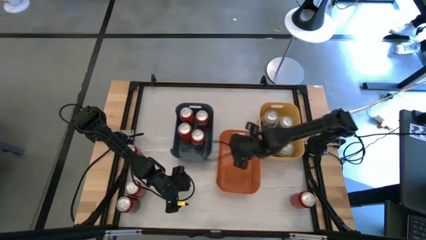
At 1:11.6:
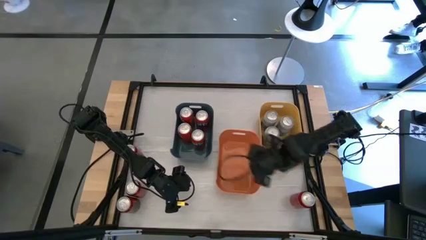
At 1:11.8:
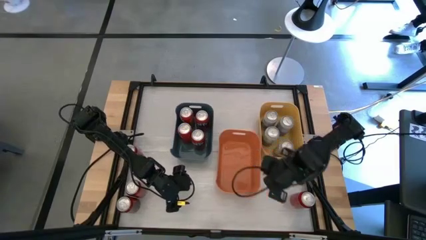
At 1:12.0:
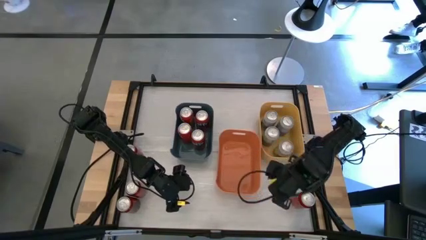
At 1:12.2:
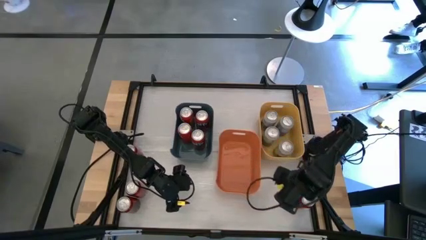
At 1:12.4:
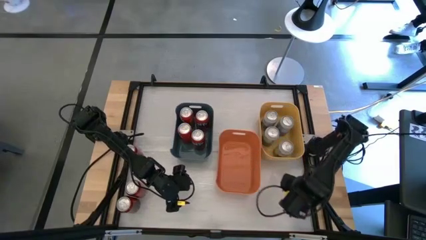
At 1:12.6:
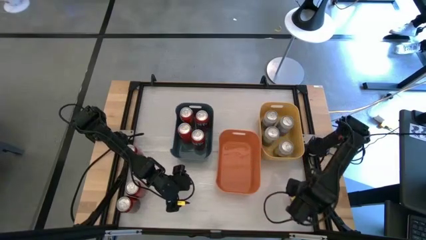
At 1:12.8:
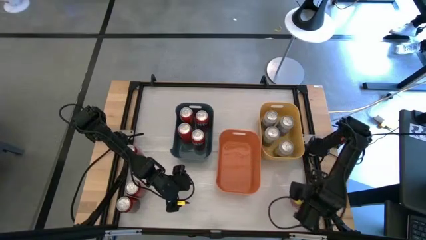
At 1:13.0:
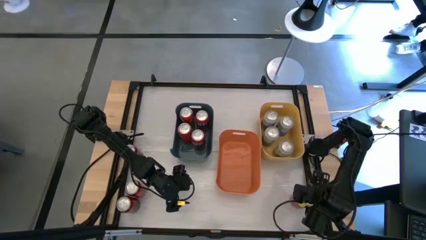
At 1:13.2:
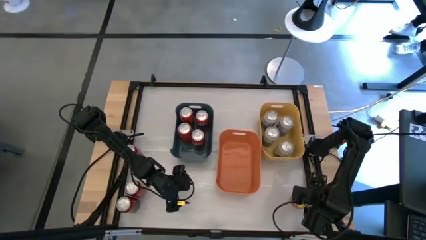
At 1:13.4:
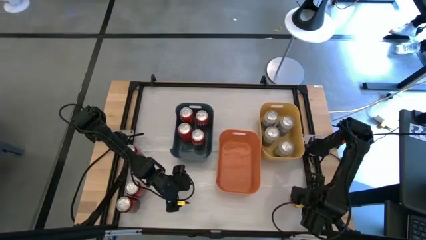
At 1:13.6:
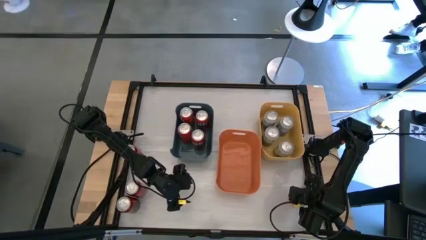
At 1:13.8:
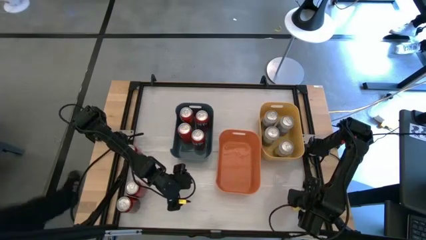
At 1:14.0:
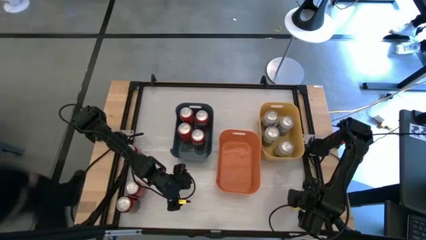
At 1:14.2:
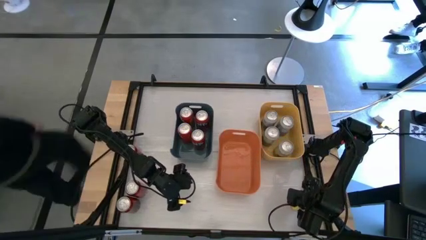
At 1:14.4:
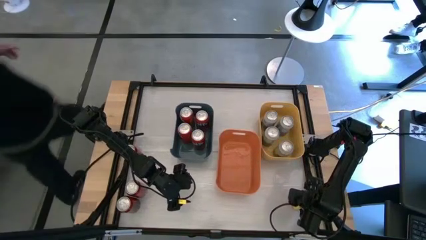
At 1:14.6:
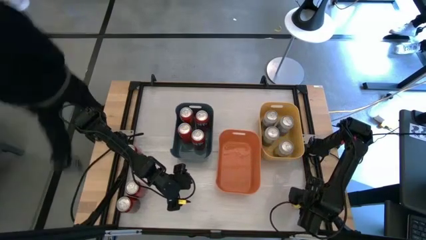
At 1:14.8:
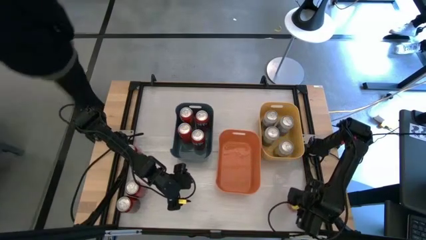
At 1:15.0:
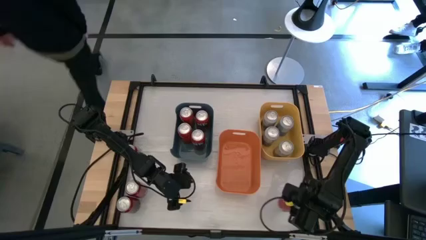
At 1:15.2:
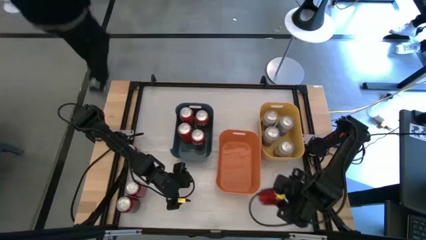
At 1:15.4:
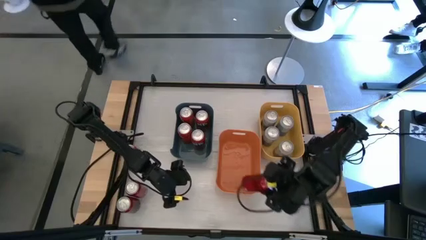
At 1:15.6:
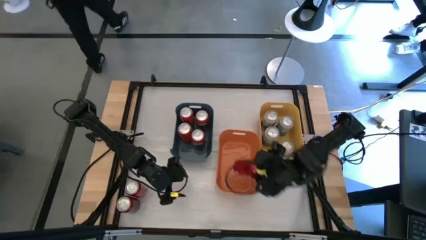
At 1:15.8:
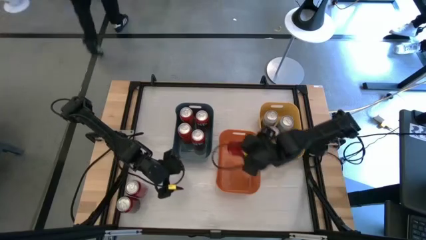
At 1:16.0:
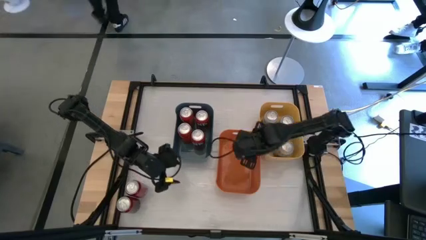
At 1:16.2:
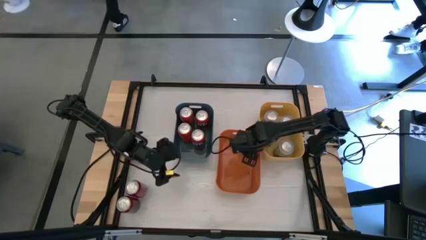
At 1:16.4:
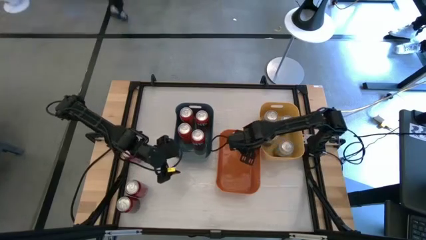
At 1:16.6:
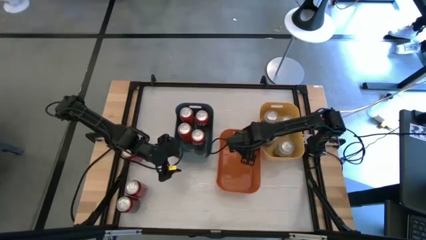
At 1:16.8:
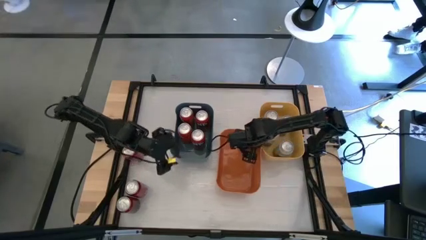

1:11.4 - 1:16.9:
Task: Sort soda cans
Put the right red soda can into the orange bin

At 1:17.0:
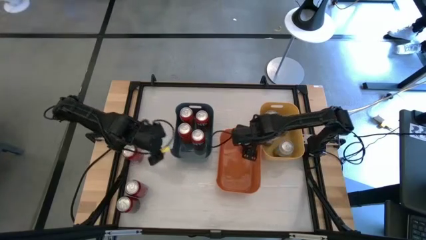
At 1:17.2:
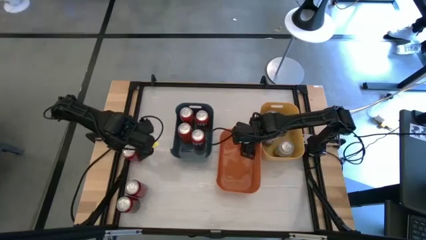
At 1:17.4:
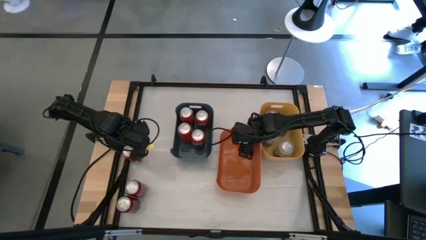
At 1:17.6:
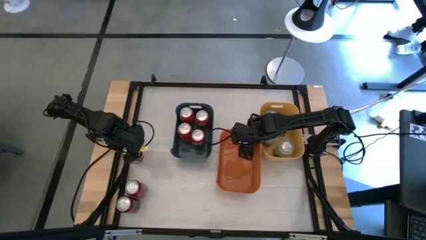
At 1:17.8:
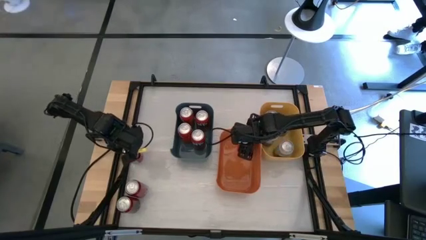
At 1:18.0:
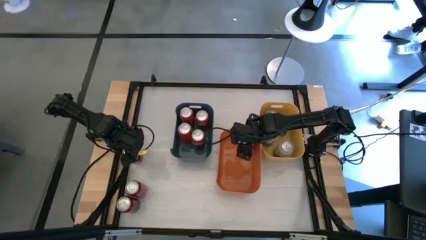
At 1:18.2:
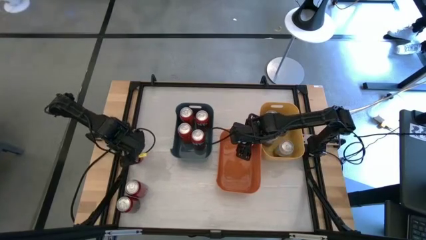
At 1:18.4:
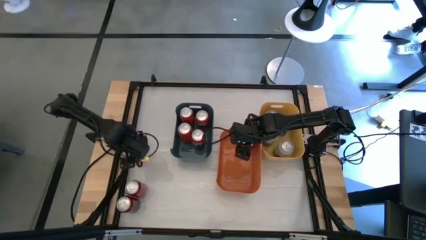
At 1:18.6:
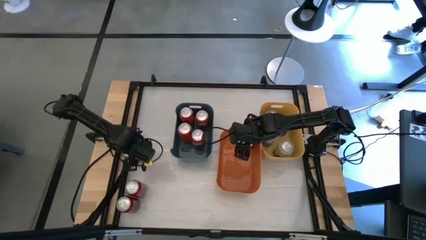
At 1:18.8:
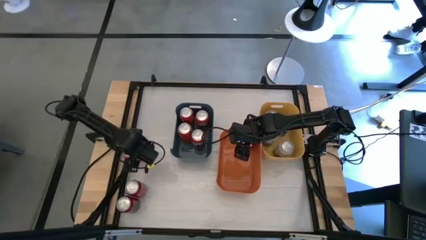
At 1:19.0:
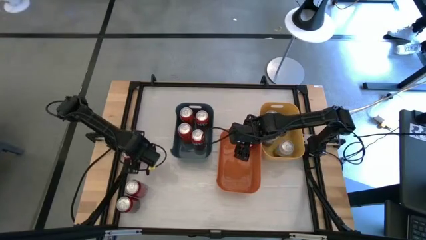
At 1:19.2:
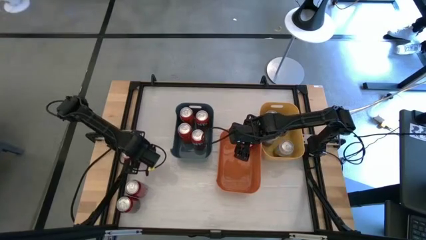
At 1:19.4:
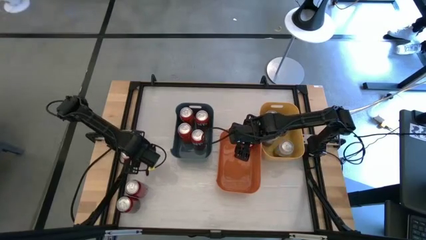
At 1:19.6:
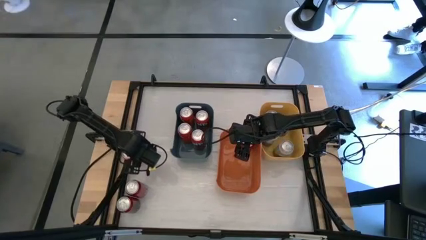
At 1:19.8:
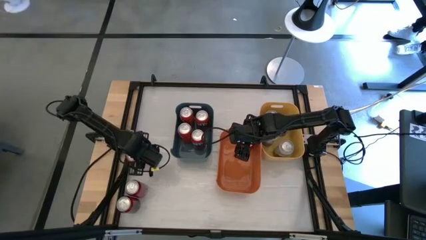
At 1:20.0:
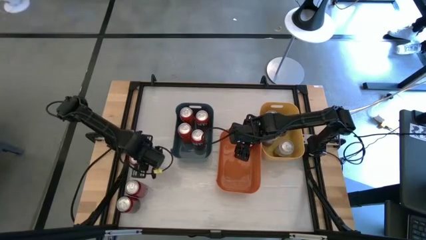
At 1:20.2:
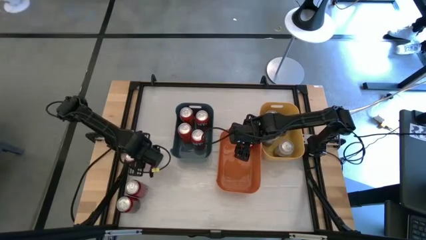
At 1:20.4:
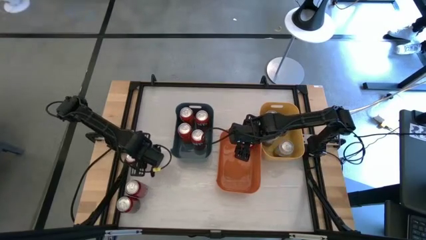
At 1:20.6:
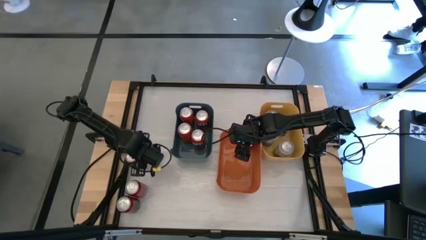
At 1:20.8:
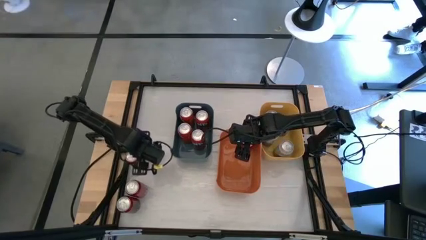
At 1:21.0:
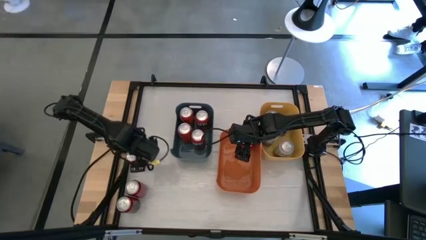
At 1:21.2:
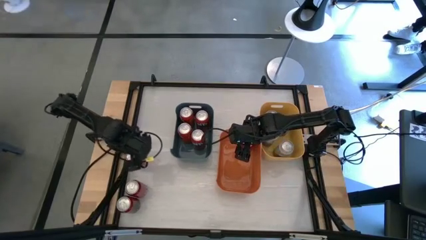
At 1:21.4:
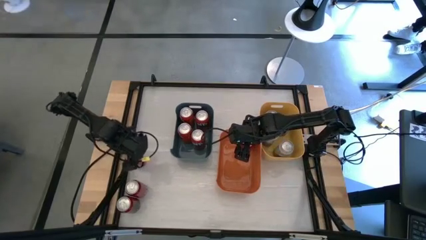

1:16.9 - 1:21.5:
Put the top red soda can into the orange bin

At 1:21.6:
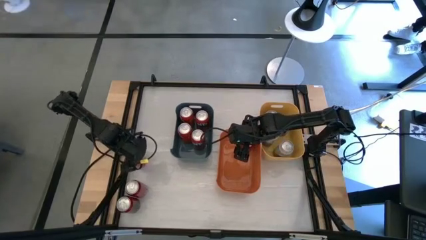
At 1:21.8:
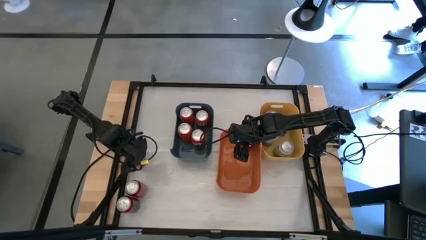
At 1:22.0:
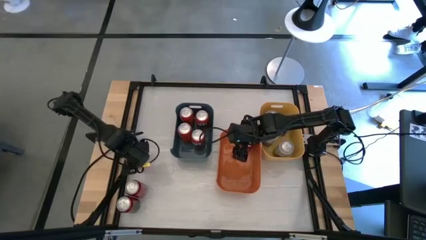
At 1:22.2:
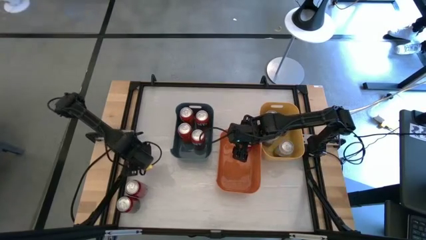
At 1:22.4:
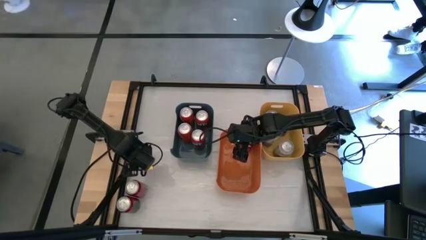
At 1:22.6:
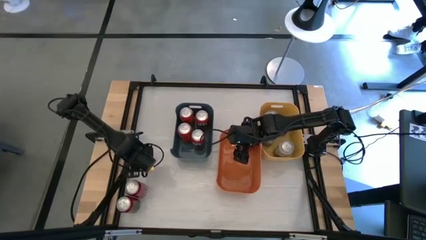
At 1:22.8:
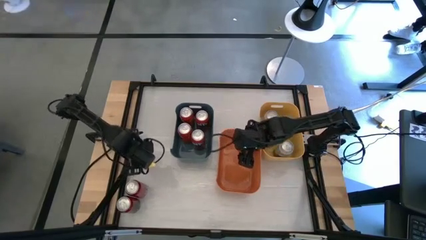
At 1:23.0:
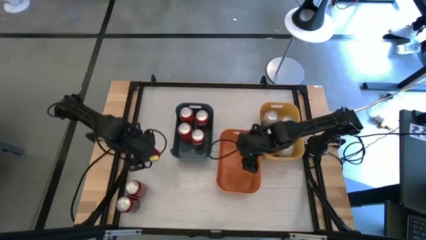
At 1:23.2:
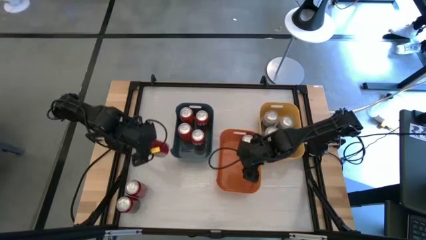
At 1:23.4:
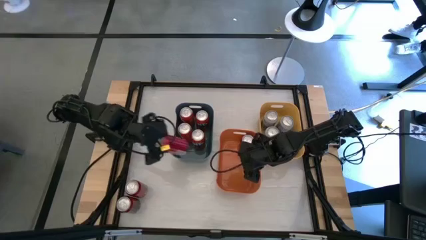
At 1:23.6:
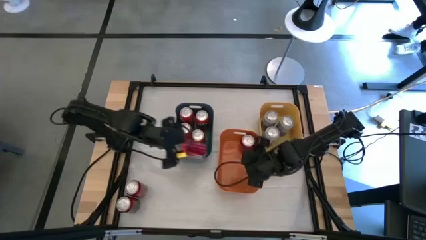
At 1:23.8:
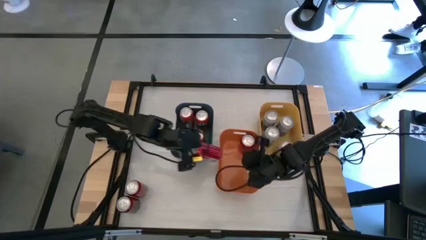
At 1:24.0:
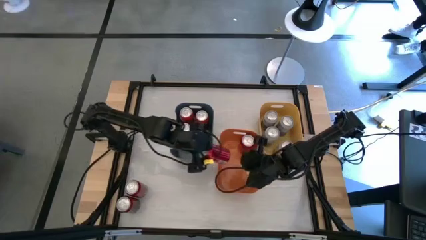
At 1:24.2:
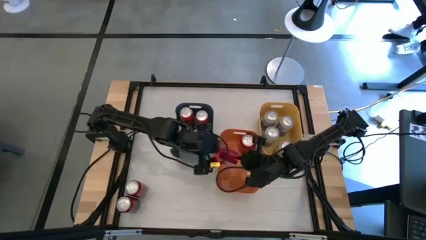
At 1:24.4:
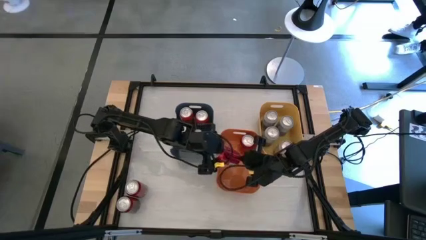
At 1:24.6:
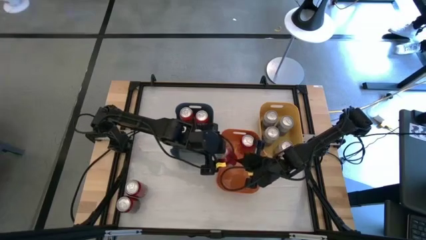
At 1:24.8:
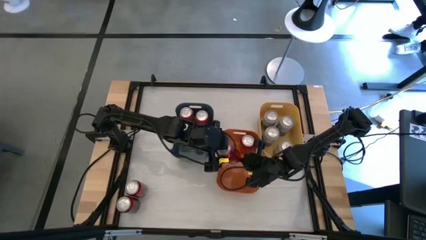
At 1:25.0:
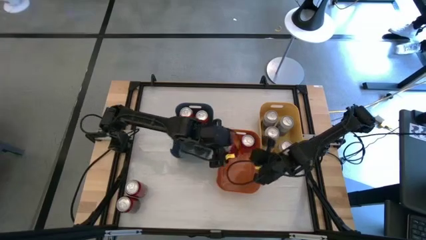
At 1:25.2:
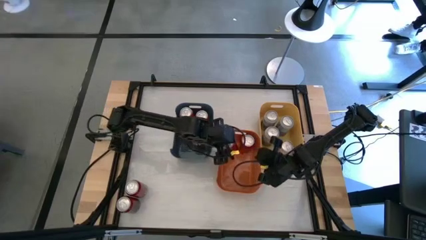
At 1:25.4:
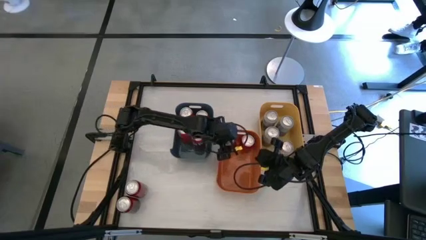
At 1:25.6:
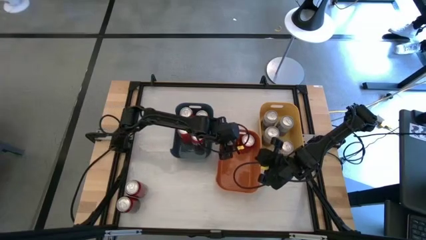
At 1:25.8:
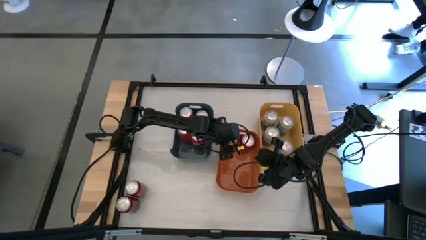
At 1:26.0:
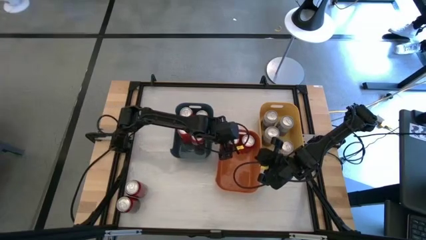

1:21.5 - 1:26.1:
Put the top red soda can into the orange bin
